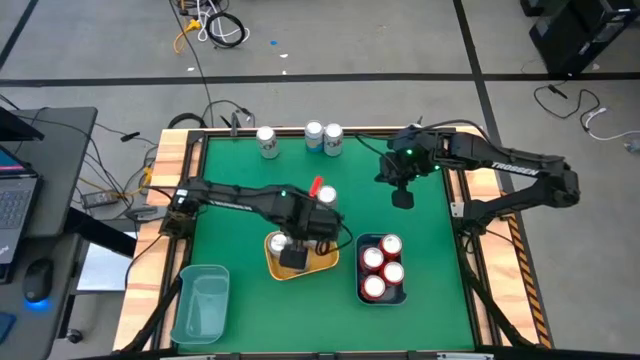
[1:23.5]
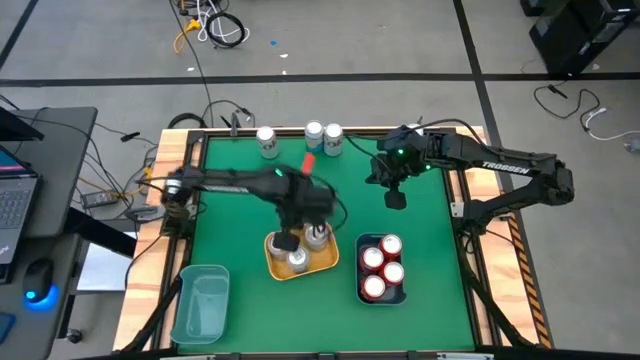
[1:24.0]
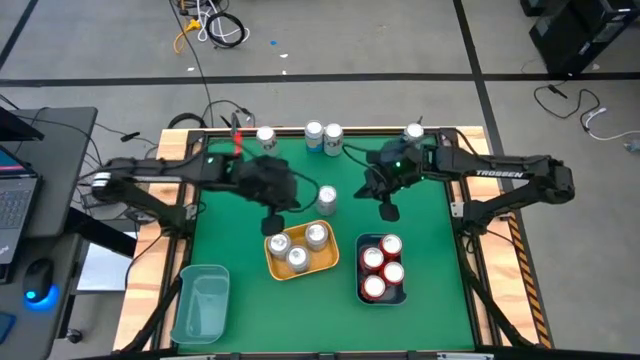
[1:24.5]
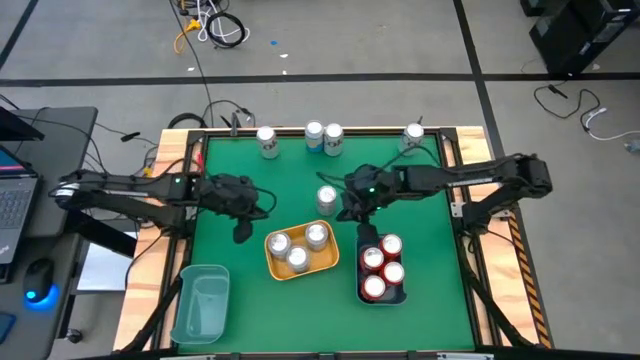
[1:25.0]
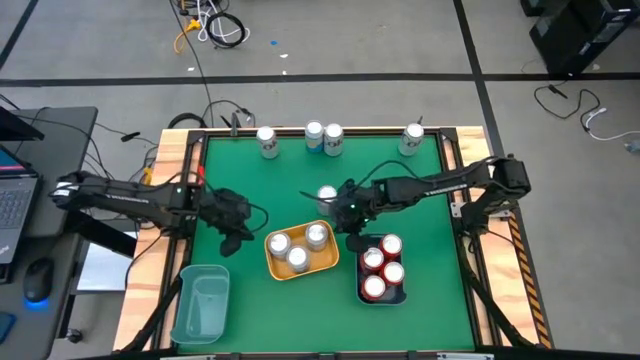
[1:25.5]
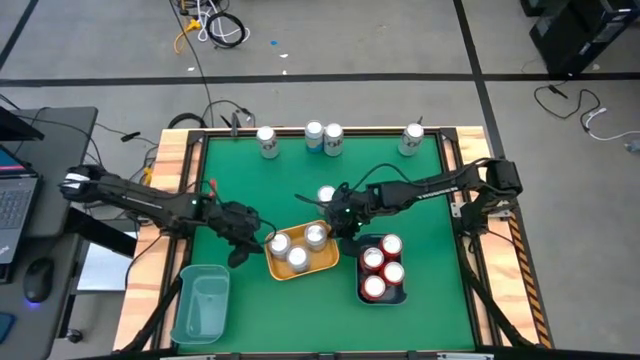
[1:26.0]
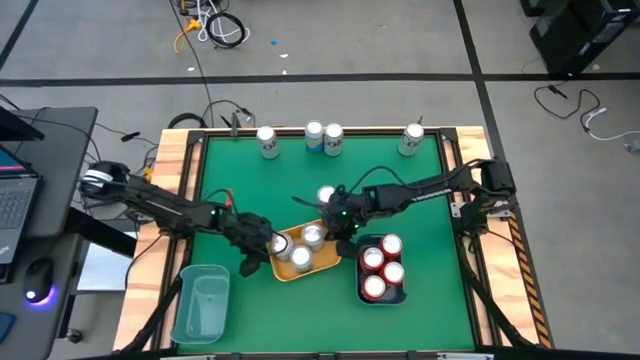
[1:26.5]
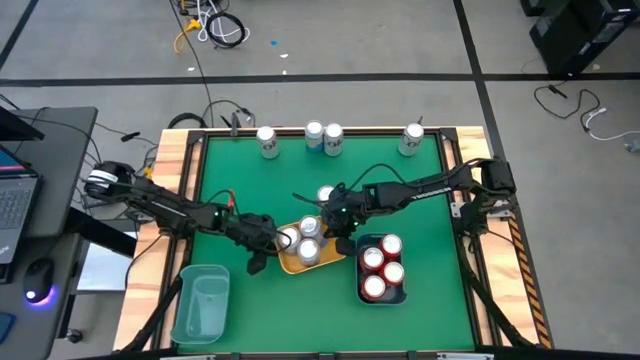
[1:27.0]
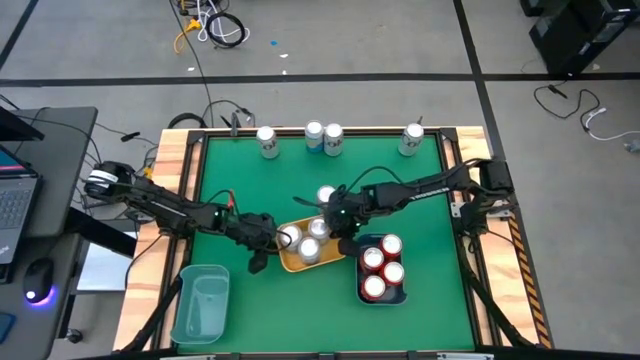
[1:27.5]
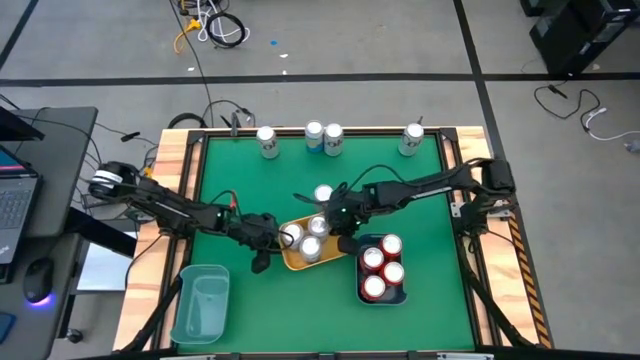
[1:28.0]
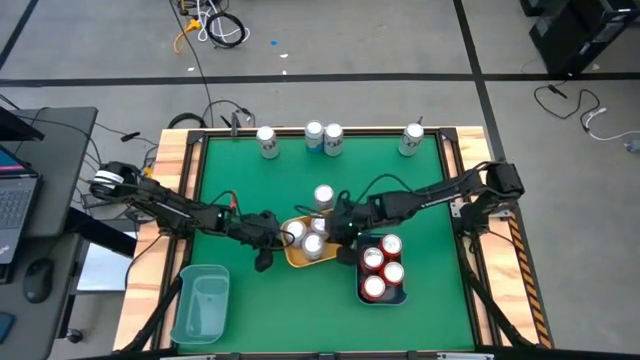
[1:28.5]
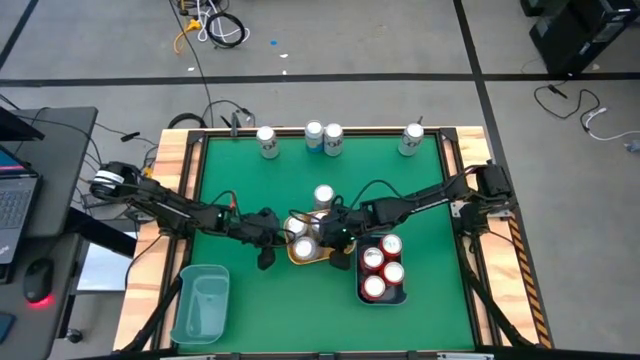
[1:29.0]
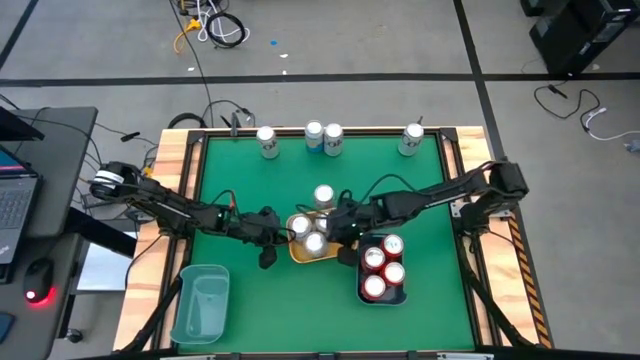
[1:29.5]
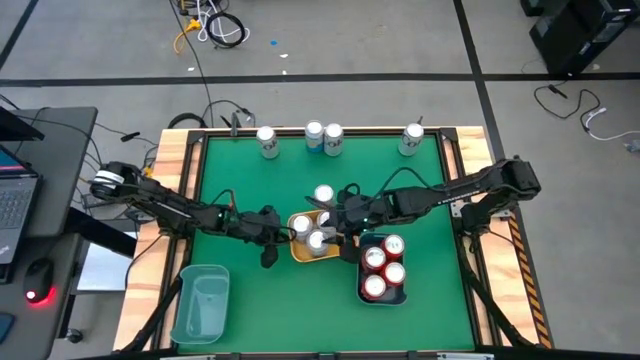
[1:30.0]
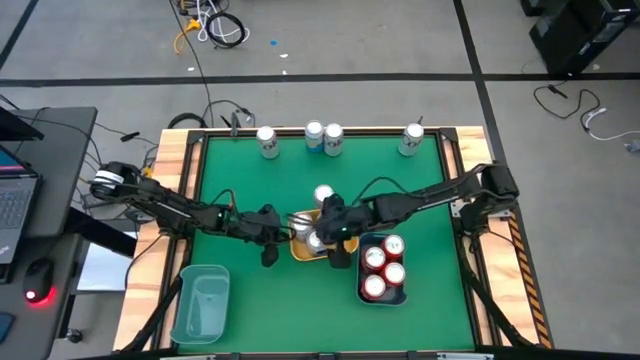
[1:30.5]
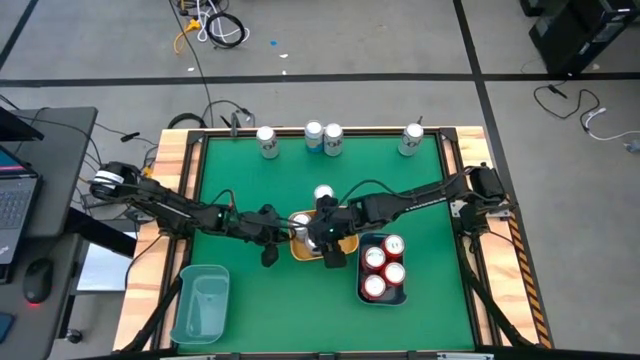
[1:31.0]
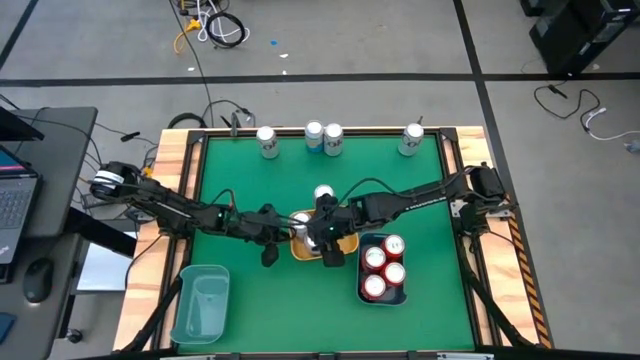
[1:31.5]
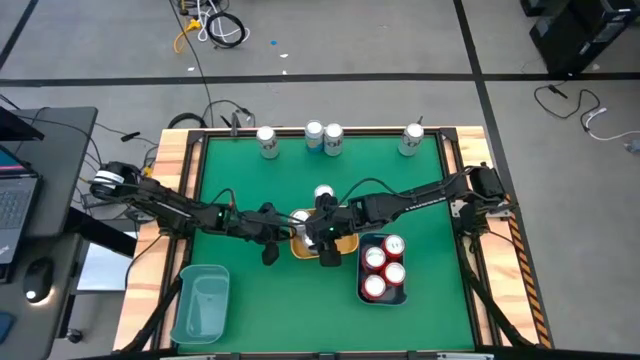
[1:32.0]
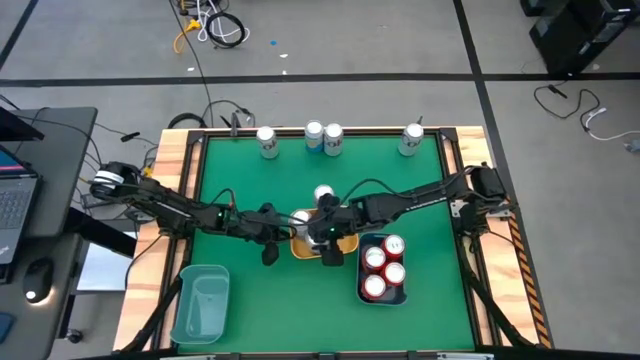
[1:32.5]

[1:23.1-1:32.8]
Task: Sort soda cans
Adjust the blue soda cans in the yellow bin

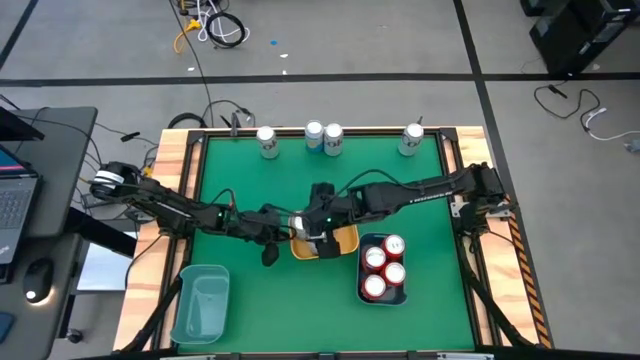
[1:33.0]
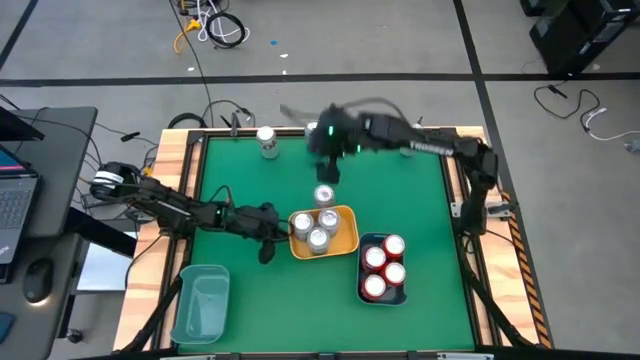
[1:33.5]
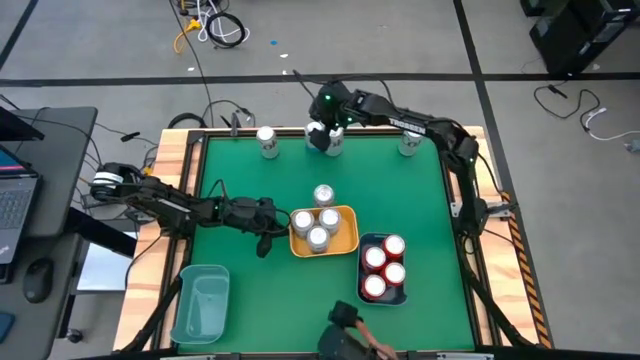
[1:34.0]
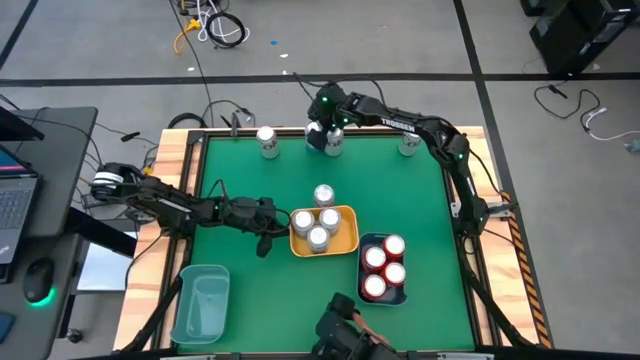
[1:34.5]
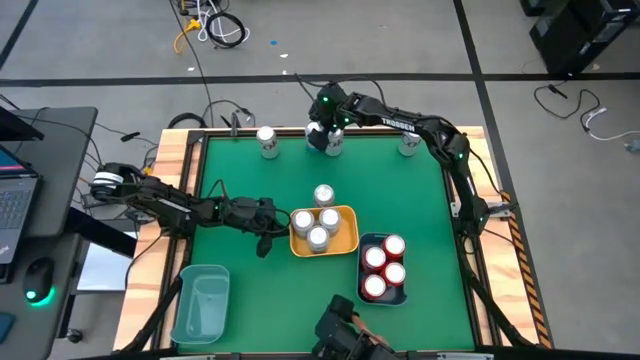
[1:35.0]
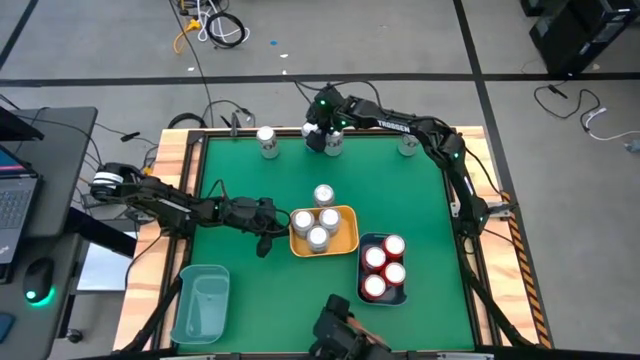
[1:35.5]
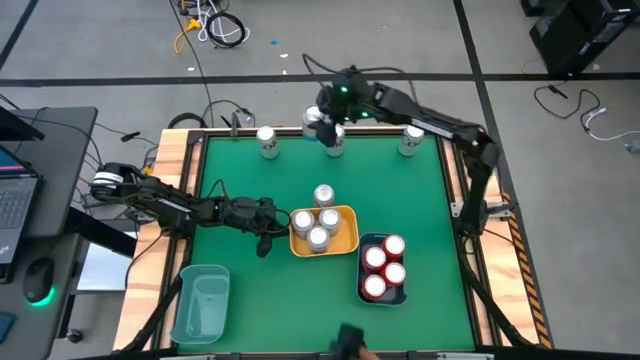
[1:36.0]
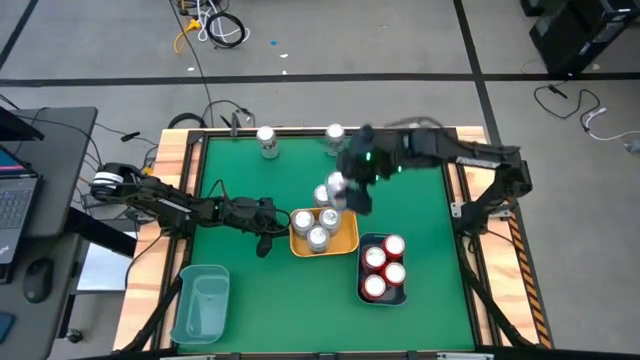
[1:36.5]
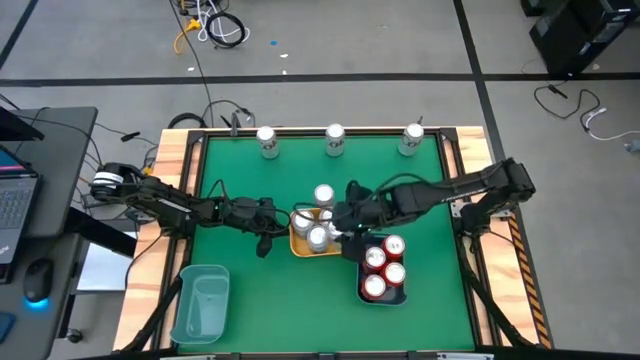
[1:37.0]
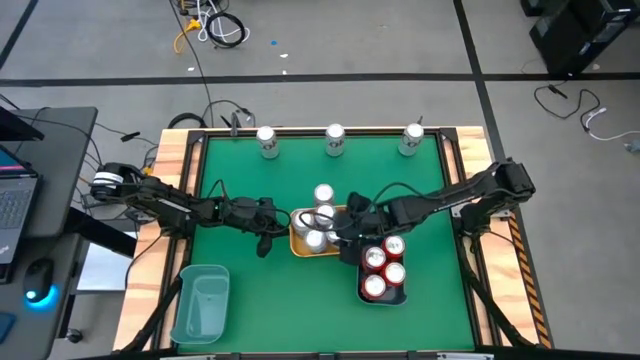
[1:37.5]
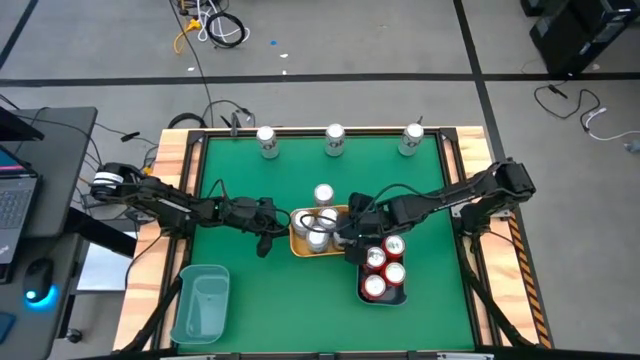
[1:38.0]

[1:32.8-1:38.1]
Put the blue soda can into the yellow bin

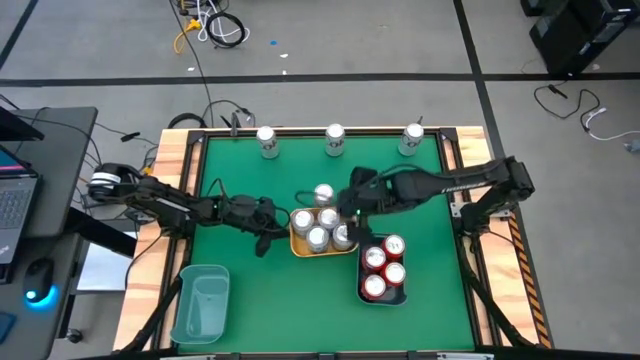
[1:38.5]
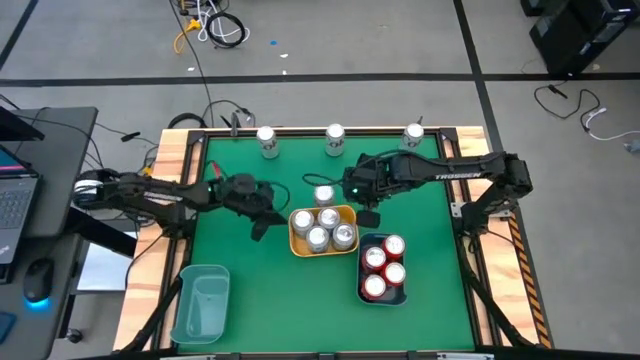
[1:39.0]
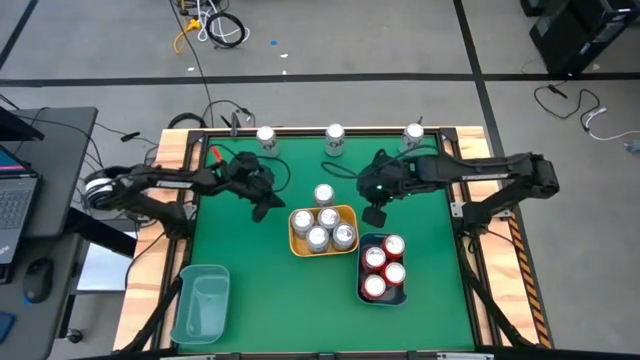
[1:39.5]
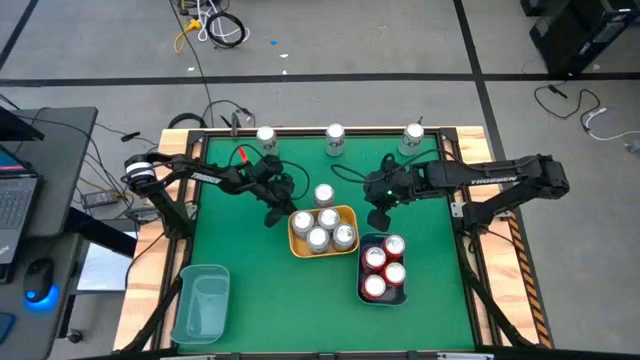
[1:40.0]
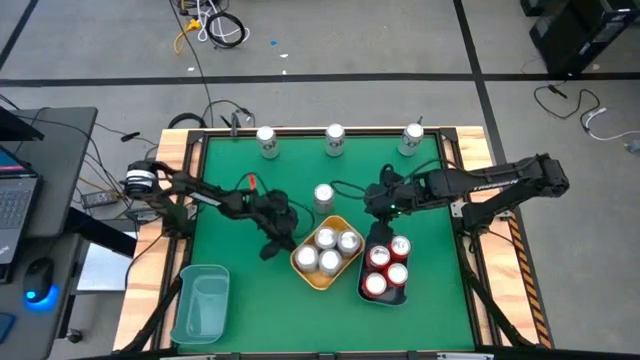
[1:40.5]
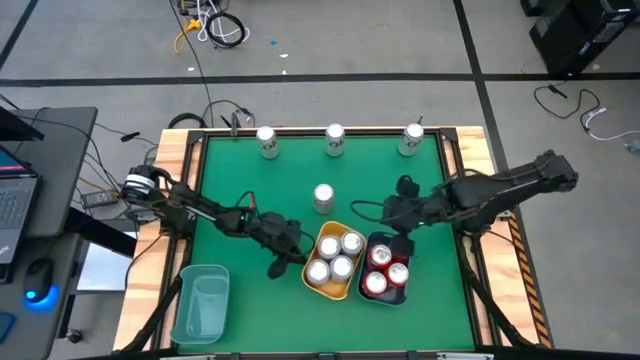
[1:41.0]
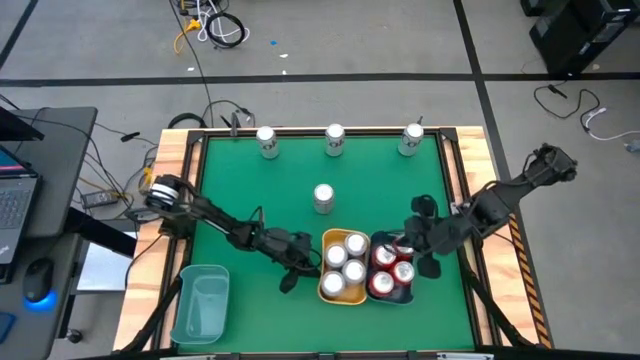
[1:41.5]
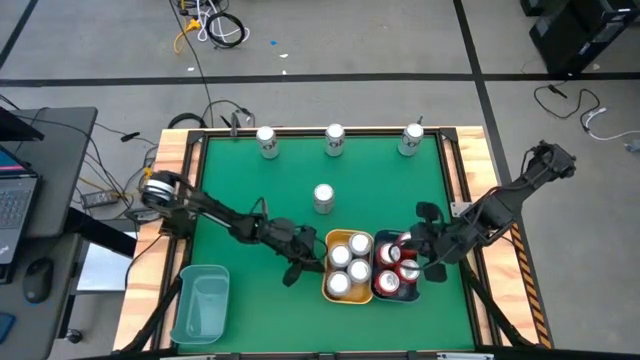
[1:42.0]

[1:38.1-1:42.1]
Adjust the yellow bin on the table

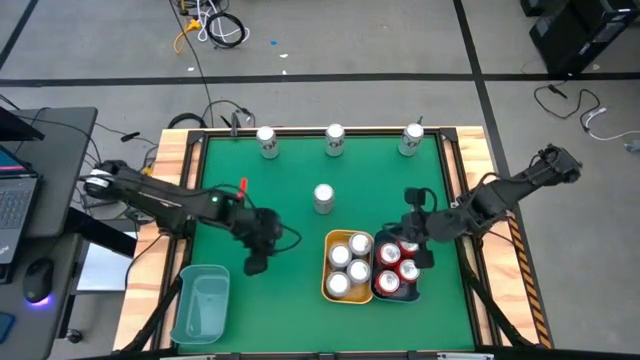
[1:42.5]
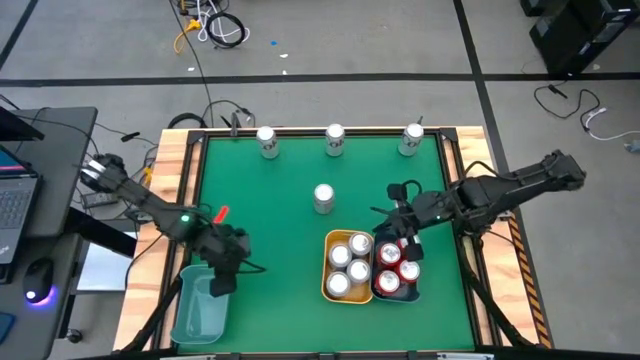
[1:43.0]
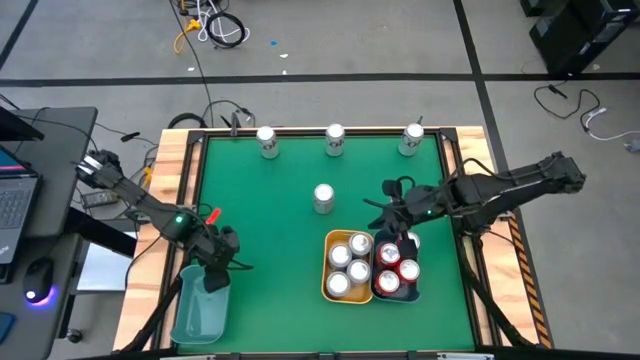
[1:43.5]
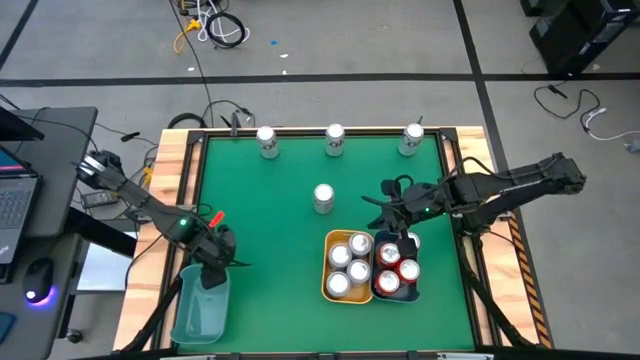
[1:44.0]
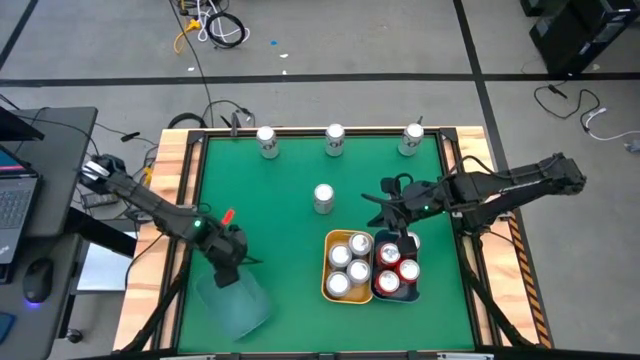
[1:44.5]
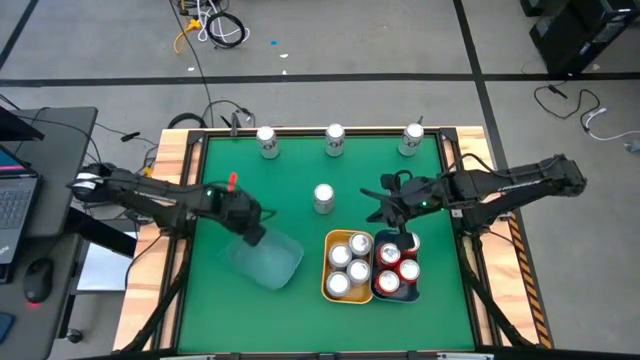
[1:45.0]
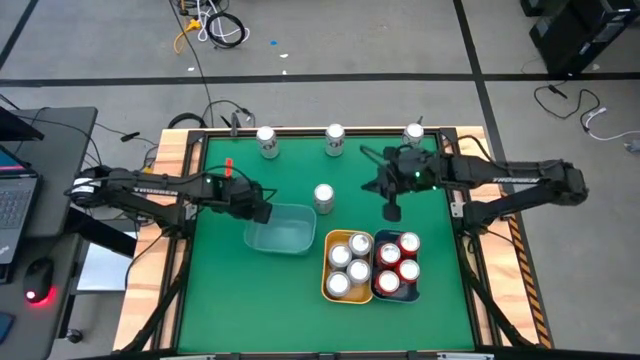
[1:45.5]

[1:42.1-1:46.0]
Move the green bin to the center of the table
